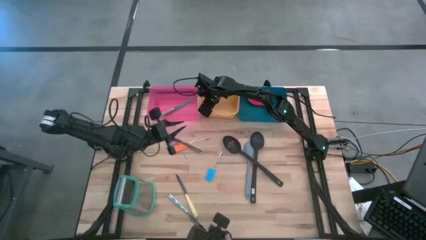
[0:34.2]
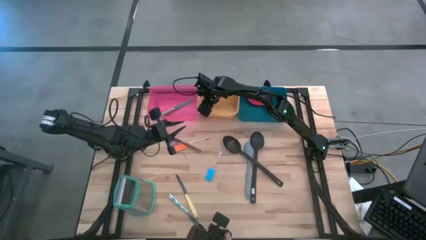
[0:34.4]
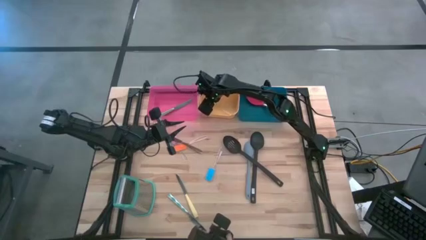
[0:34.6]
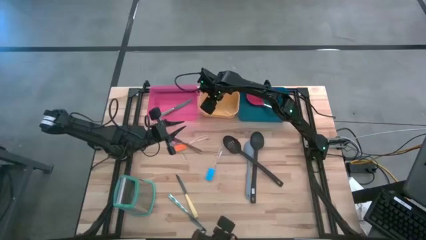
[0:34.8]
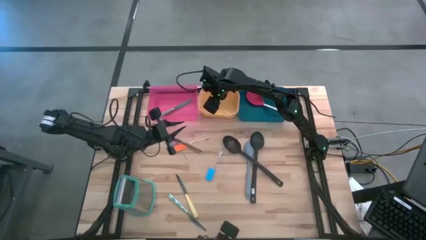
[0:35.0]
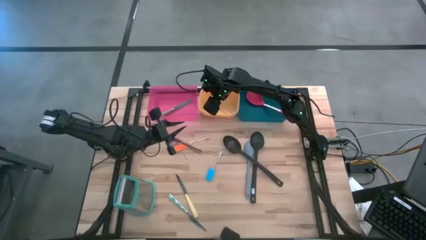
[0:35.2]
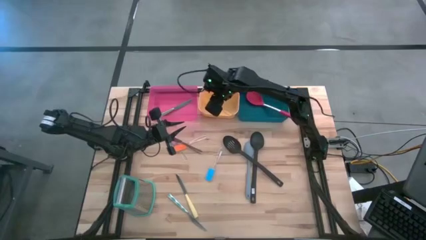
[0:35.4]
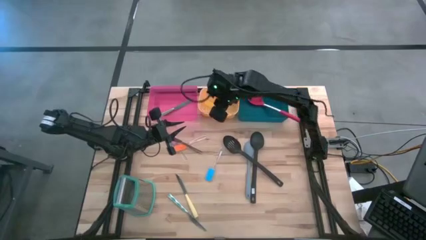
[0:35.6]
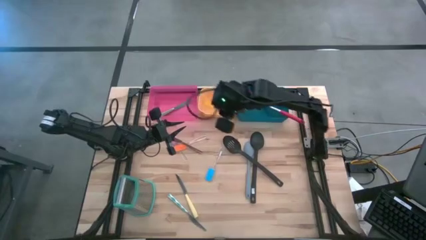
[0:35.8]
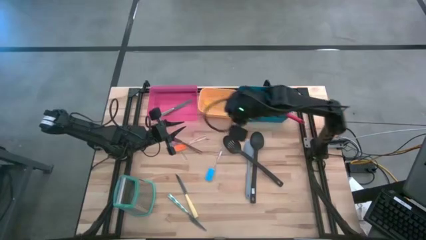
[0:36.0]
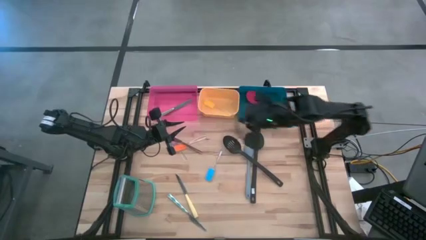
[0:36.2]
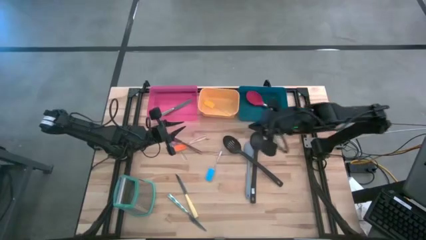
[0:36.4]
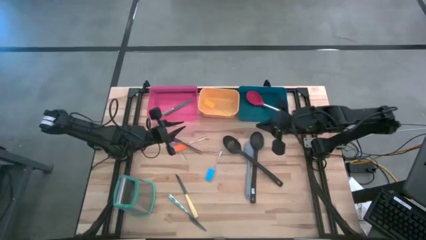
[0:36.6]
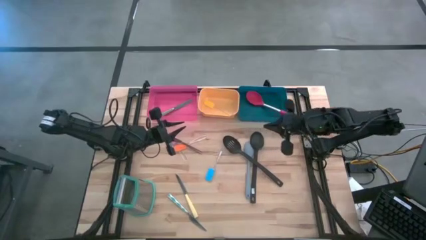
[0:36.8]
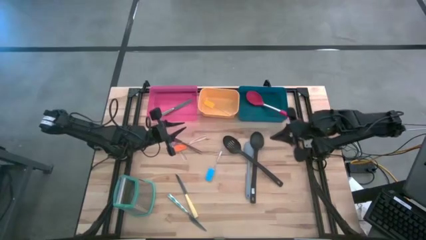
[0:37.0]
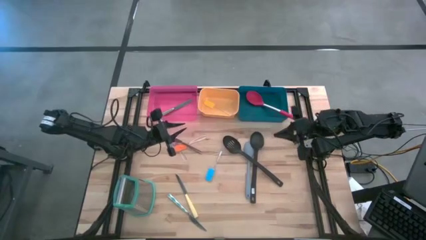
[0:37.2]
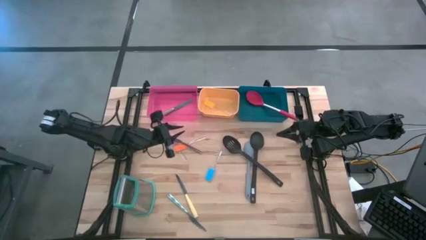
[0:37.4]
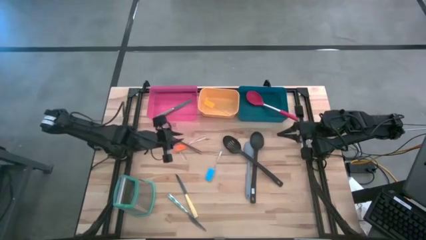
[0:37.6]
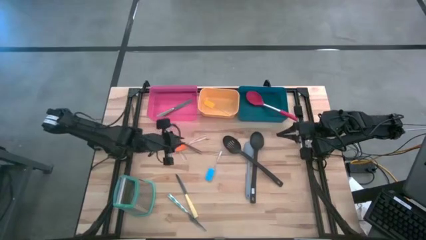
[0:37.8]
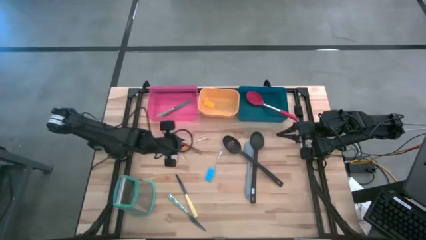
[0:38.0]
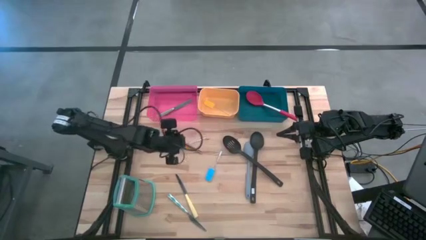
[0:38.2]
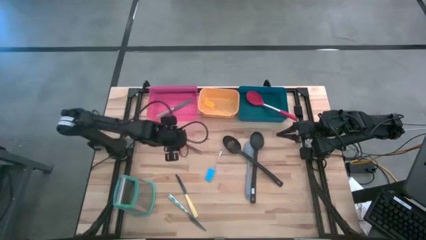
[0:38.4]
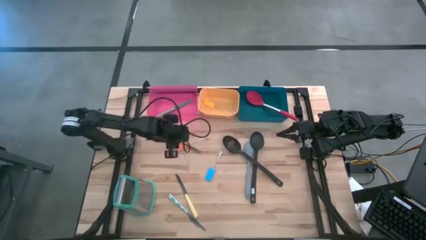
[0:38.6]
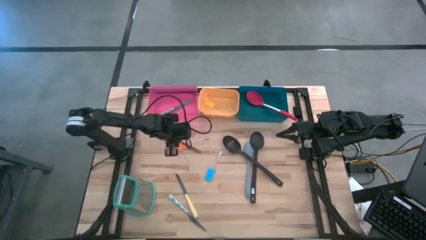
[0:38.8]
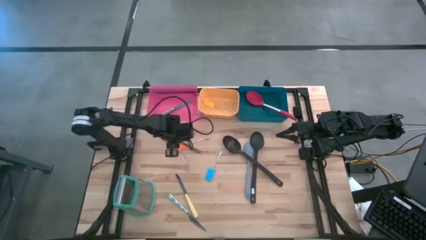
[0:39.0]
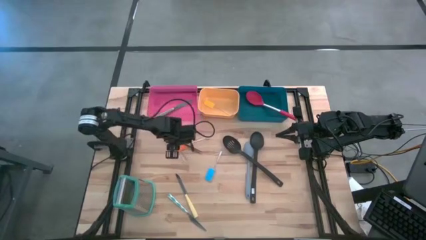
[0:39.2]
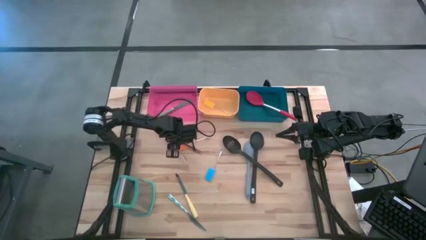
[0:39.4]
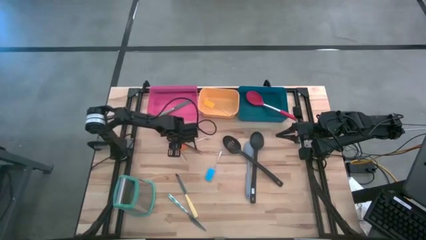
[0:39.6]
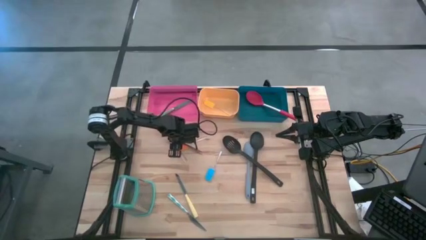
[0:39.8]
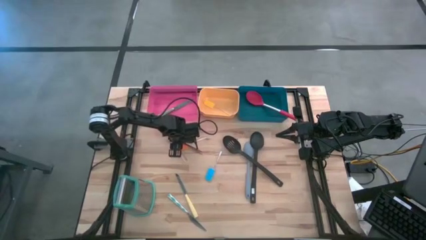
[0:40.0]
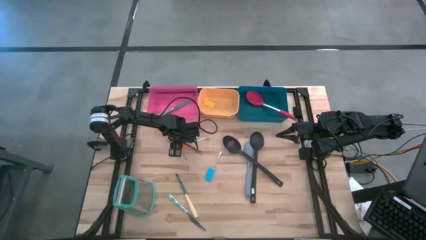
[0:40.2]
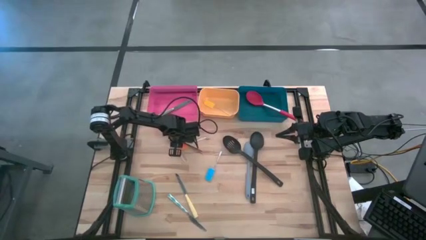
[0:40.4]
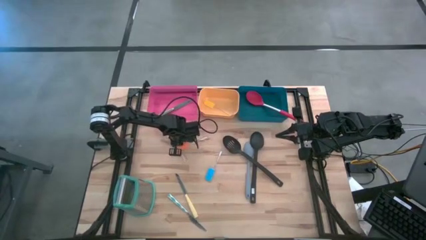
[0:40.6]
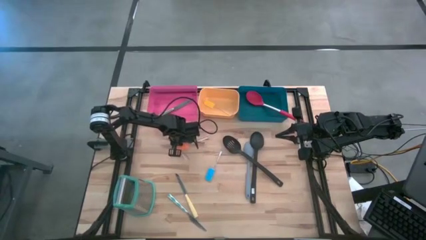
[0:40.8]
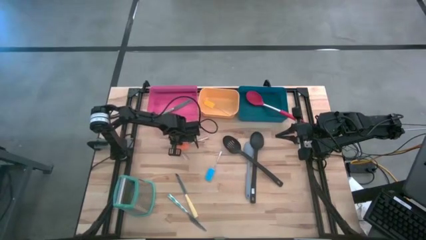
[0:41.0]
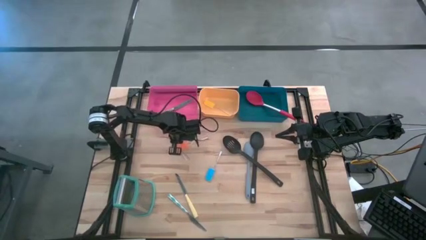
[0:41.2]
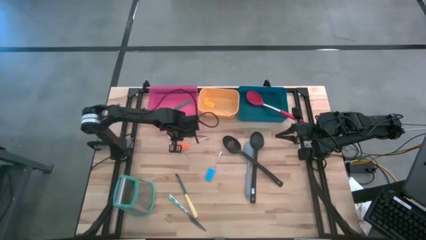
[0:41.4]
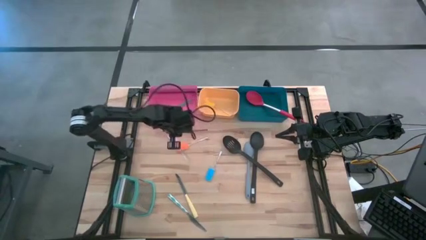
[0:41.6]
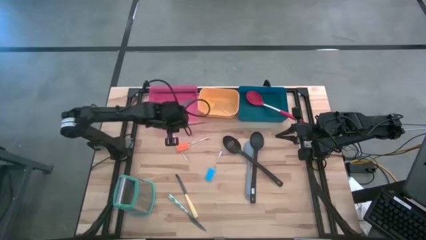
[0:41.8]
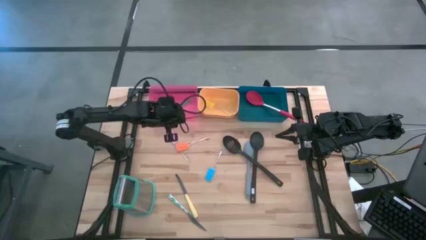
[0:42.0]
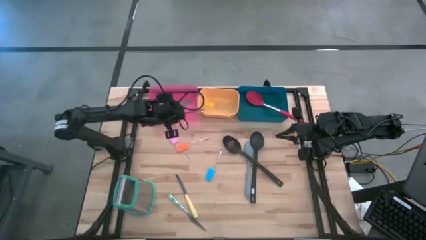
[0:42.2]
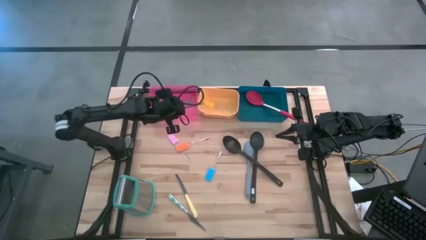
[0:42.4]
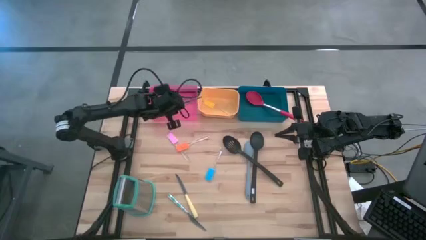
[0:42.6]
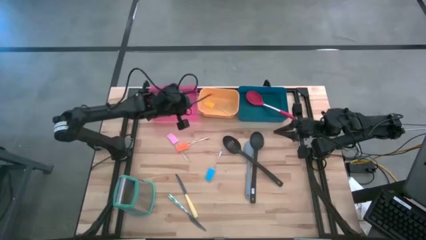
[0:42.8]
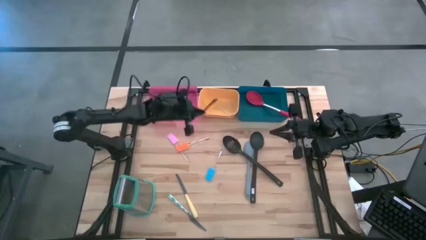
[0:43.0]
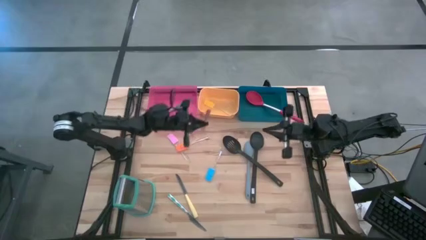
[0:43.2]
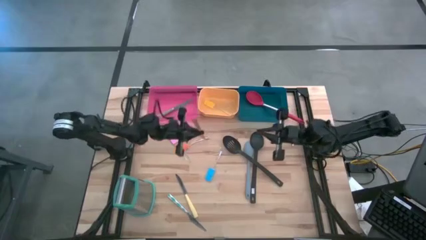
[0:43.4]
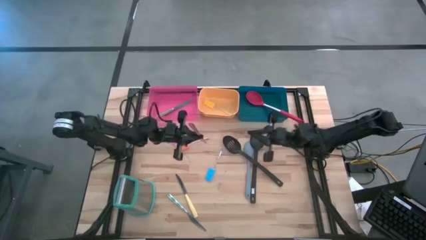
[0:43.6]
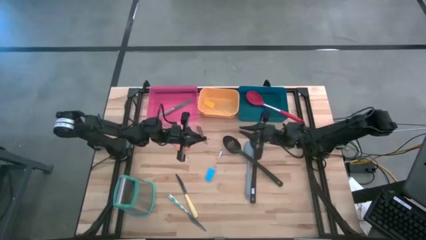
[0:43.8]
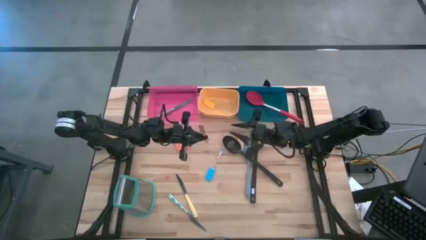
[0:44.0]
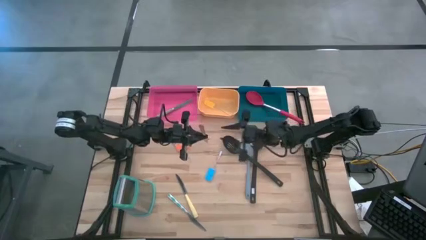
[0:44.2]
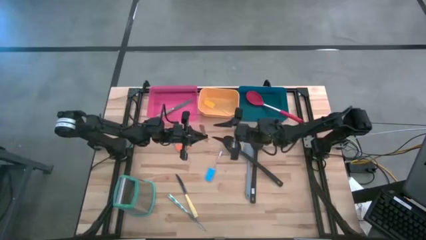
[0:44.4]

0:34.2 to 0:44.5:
Task: Pick & Place Kitchen Items
Put the brown knife into the red bin
